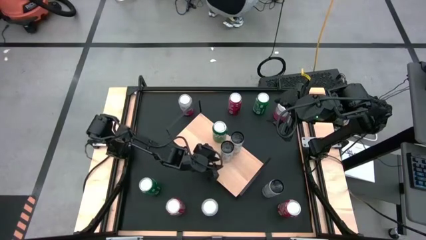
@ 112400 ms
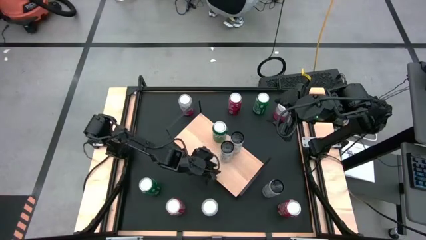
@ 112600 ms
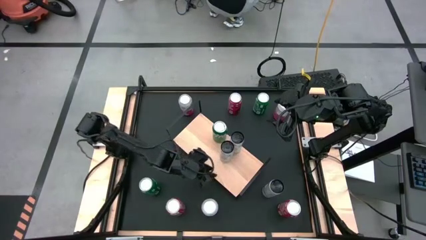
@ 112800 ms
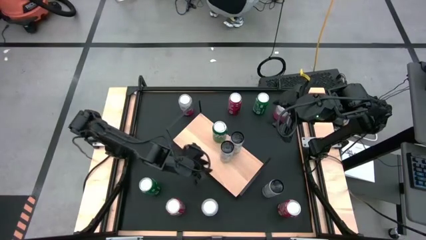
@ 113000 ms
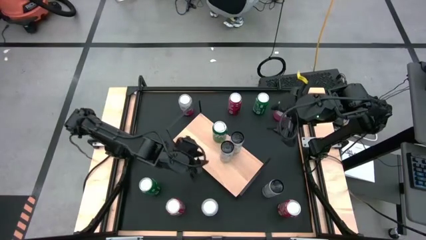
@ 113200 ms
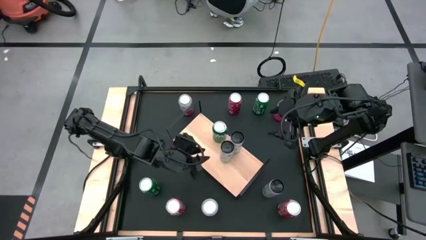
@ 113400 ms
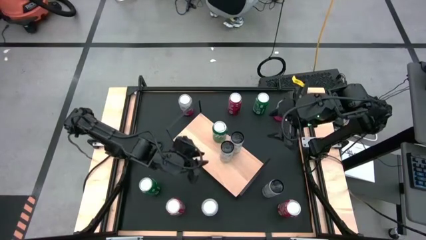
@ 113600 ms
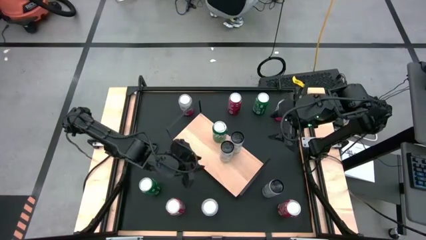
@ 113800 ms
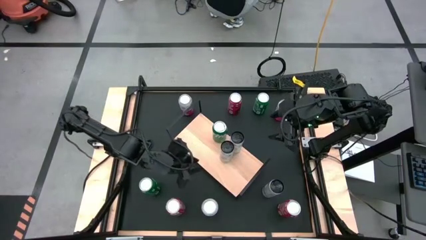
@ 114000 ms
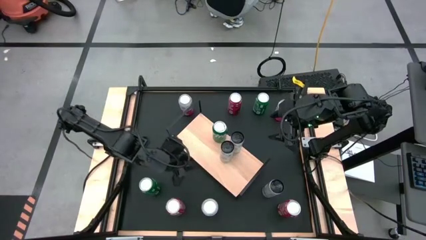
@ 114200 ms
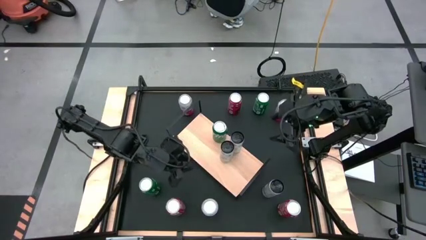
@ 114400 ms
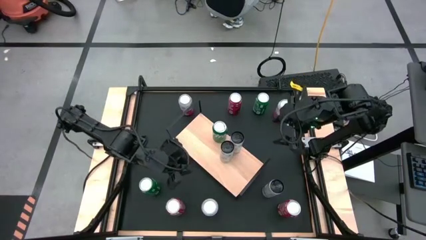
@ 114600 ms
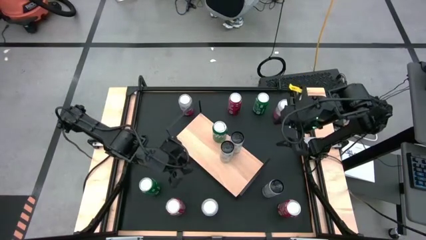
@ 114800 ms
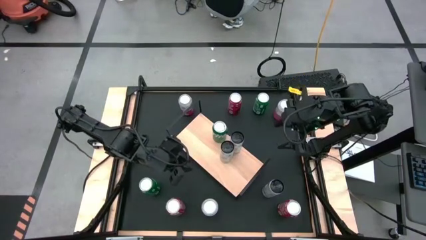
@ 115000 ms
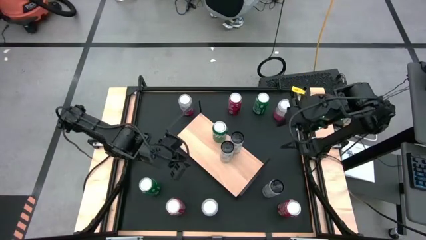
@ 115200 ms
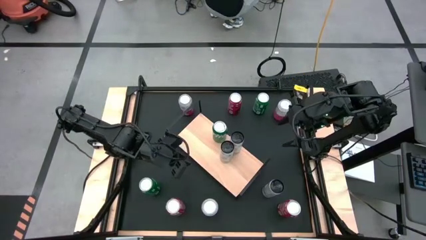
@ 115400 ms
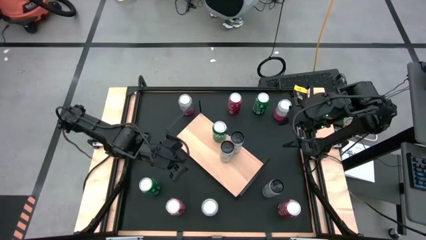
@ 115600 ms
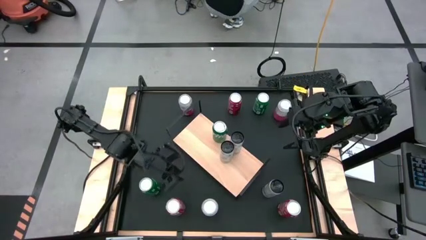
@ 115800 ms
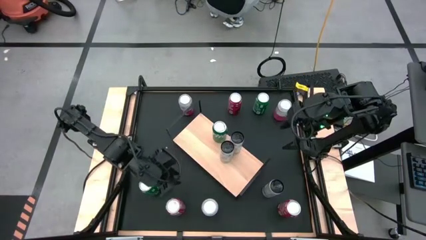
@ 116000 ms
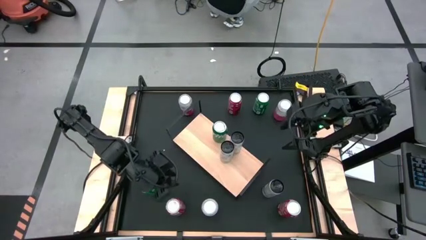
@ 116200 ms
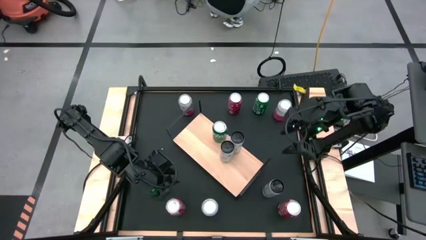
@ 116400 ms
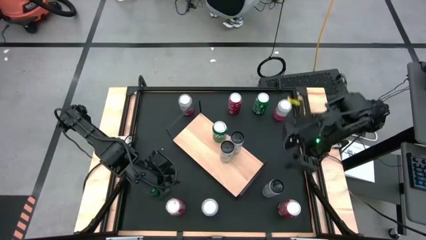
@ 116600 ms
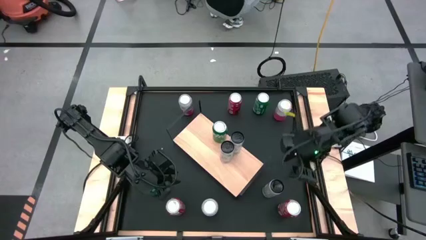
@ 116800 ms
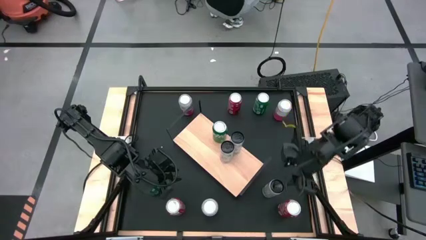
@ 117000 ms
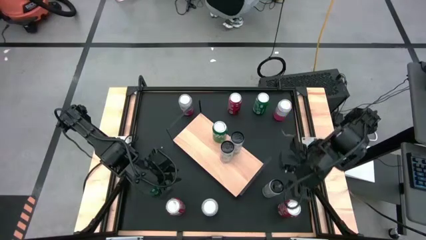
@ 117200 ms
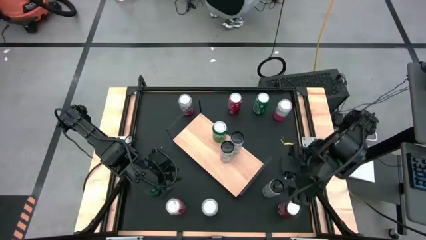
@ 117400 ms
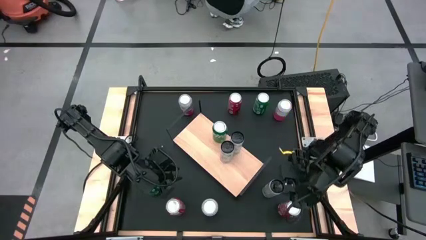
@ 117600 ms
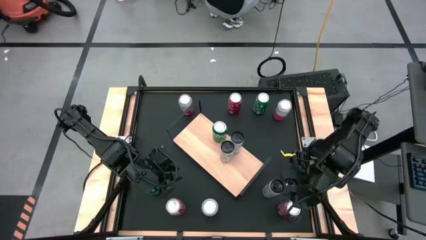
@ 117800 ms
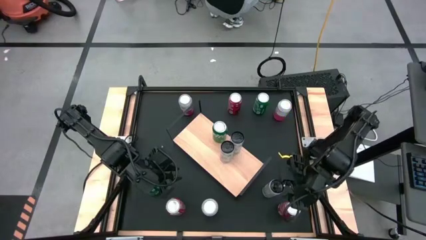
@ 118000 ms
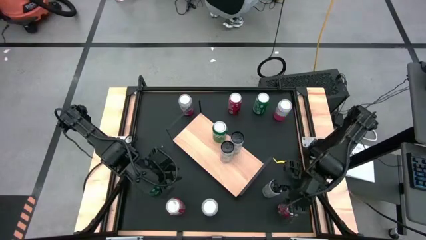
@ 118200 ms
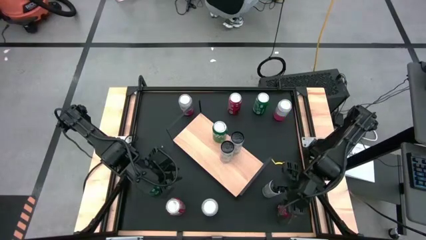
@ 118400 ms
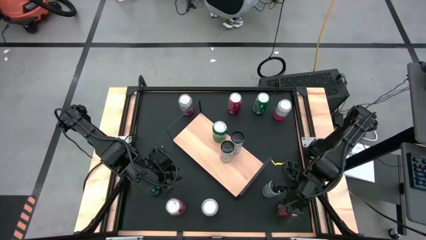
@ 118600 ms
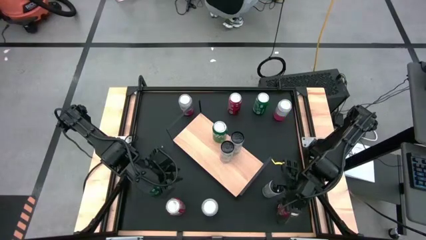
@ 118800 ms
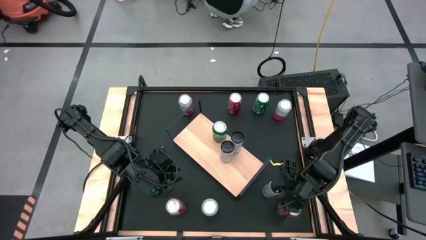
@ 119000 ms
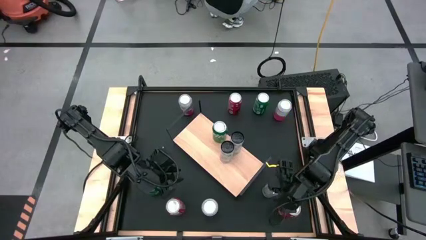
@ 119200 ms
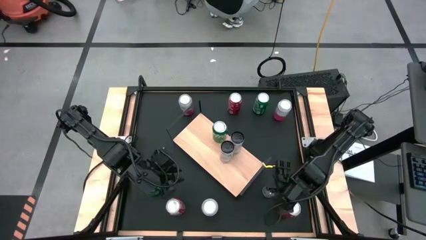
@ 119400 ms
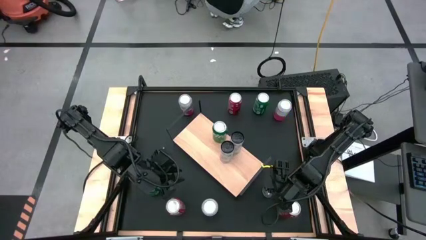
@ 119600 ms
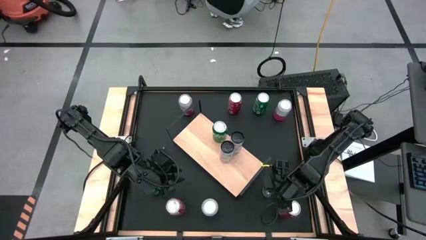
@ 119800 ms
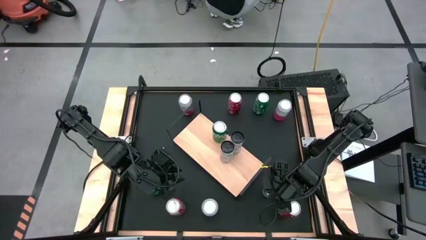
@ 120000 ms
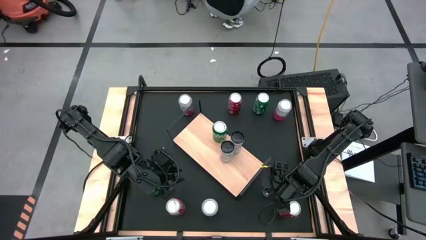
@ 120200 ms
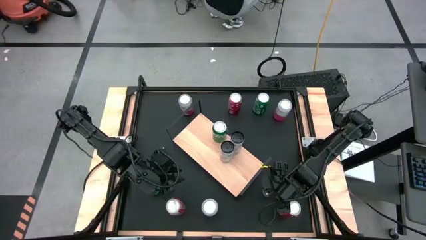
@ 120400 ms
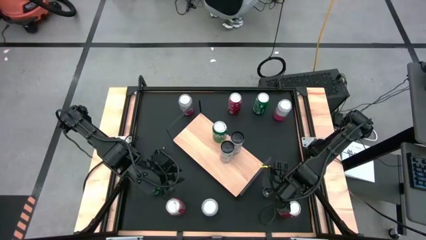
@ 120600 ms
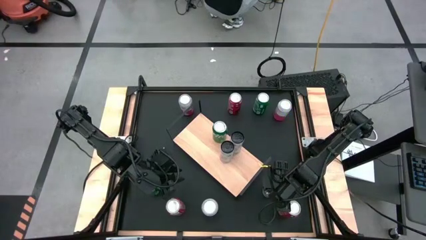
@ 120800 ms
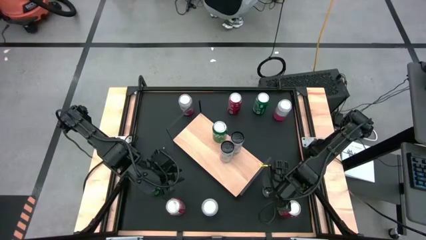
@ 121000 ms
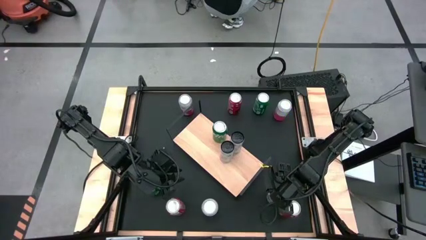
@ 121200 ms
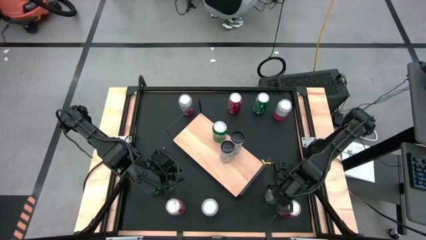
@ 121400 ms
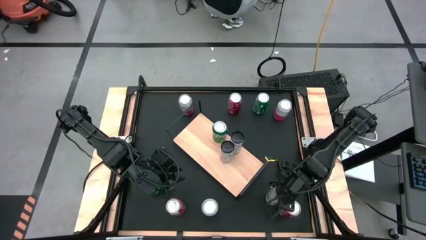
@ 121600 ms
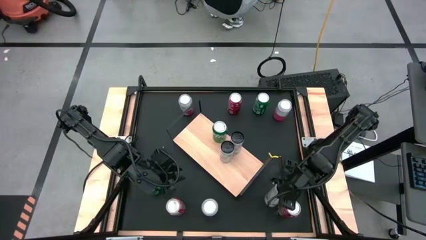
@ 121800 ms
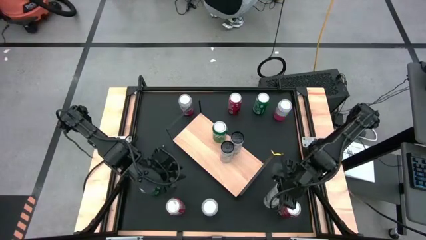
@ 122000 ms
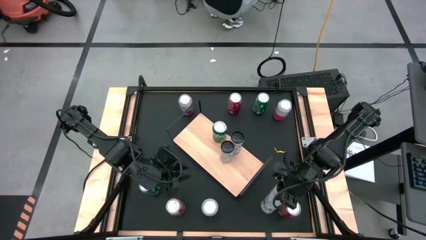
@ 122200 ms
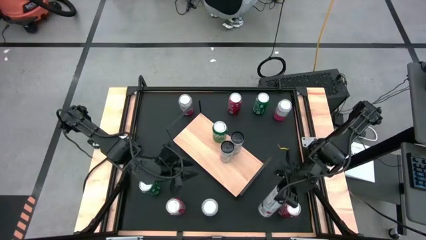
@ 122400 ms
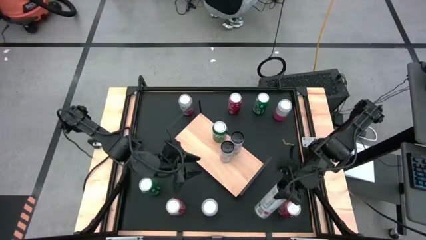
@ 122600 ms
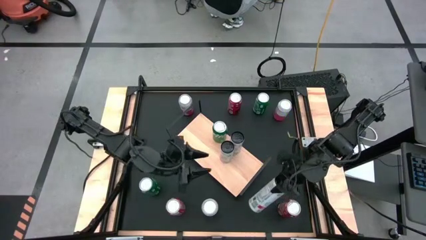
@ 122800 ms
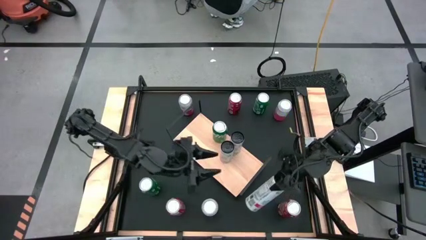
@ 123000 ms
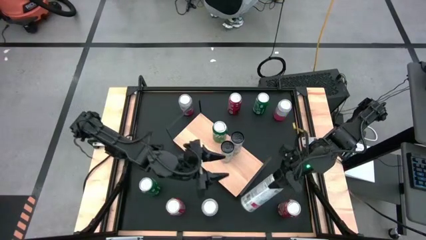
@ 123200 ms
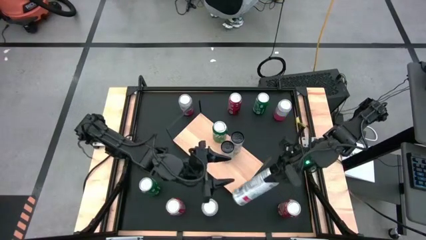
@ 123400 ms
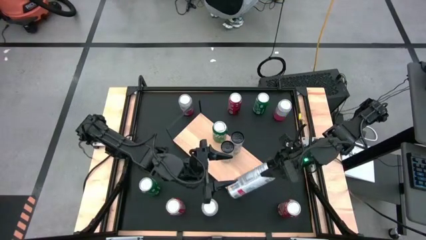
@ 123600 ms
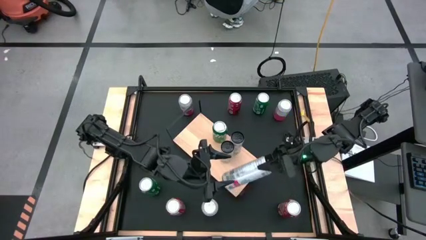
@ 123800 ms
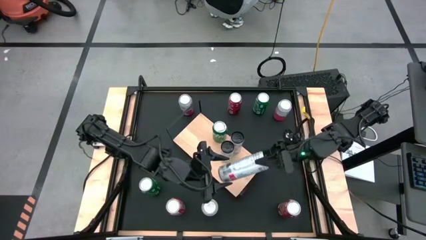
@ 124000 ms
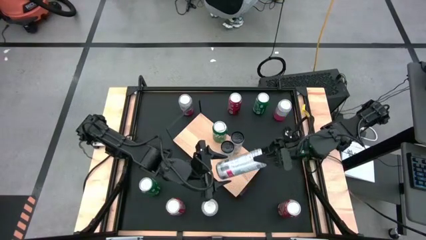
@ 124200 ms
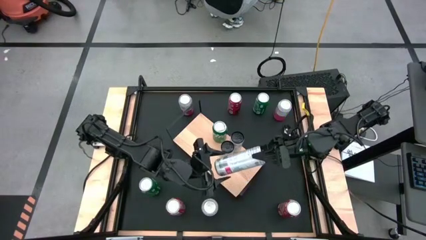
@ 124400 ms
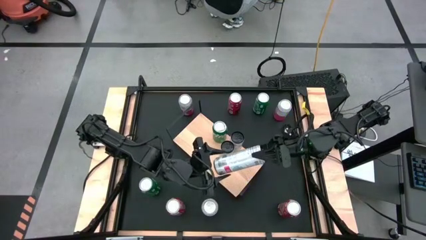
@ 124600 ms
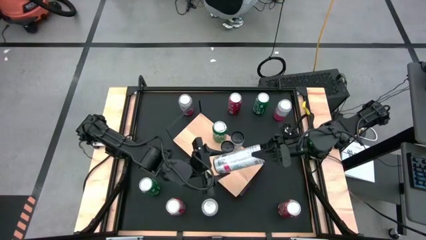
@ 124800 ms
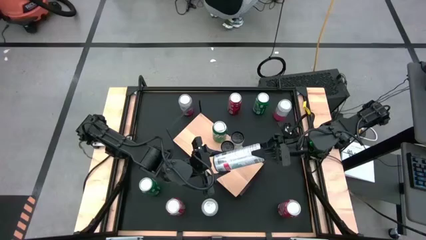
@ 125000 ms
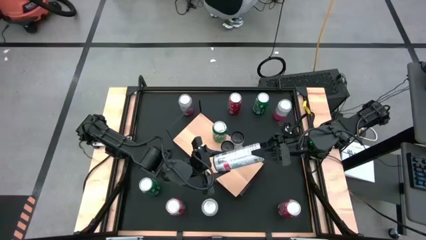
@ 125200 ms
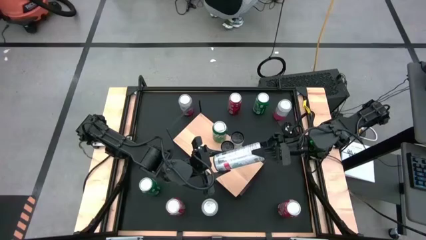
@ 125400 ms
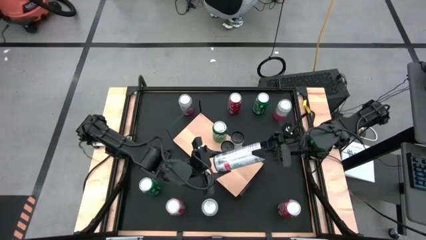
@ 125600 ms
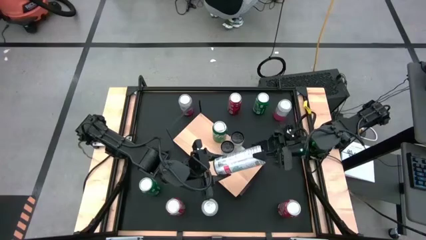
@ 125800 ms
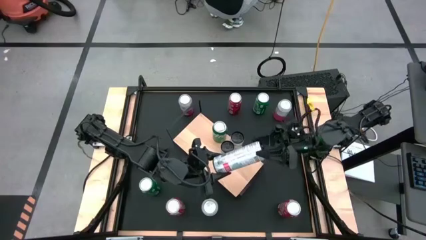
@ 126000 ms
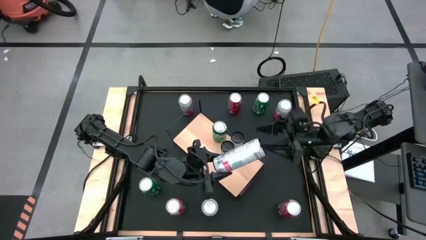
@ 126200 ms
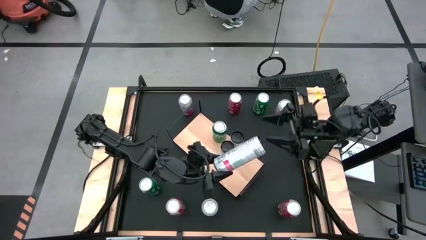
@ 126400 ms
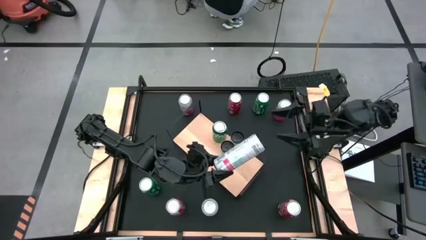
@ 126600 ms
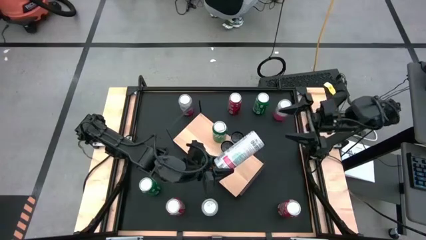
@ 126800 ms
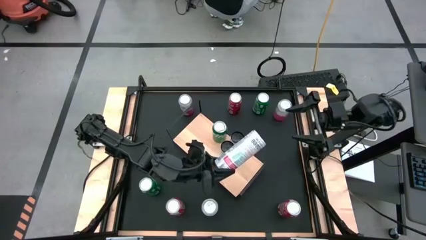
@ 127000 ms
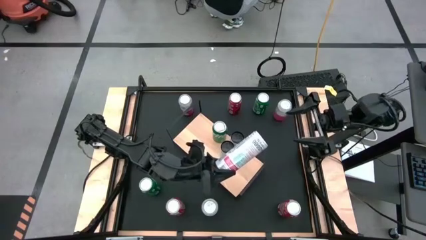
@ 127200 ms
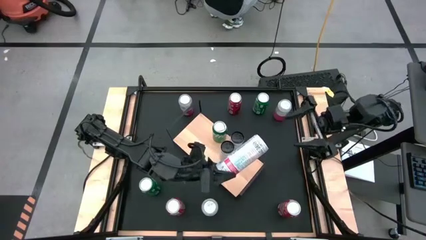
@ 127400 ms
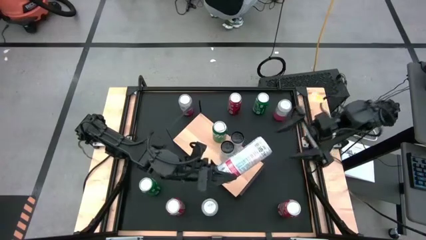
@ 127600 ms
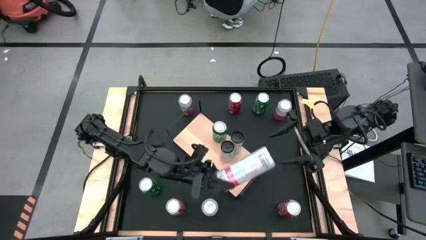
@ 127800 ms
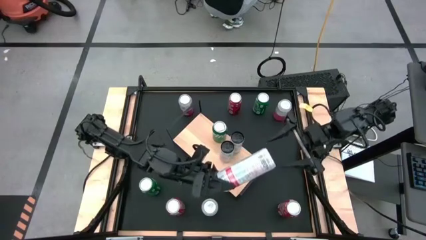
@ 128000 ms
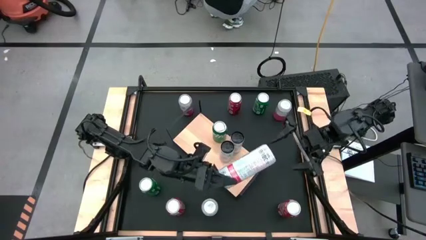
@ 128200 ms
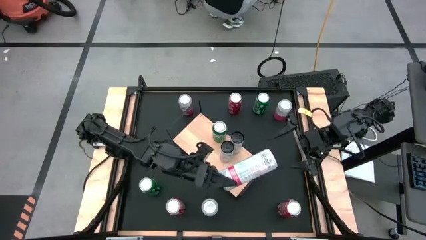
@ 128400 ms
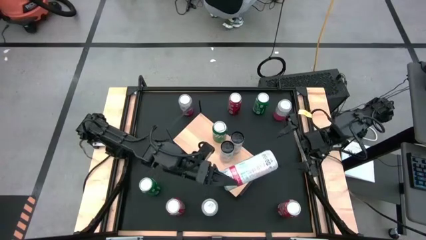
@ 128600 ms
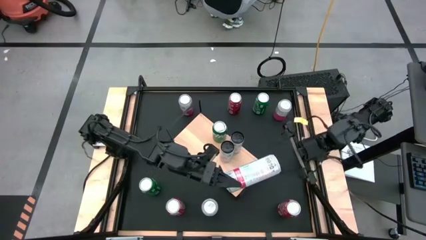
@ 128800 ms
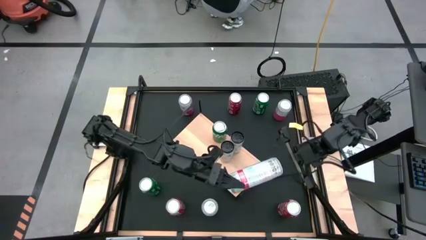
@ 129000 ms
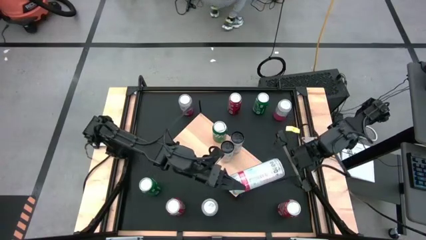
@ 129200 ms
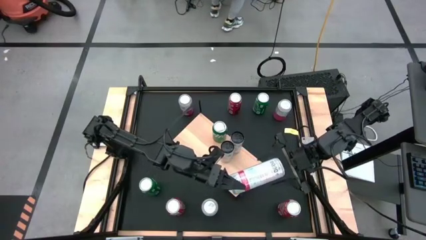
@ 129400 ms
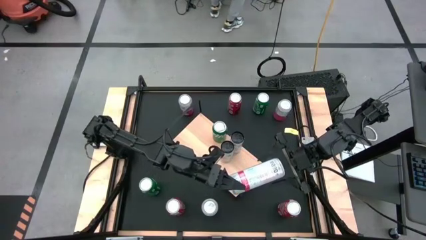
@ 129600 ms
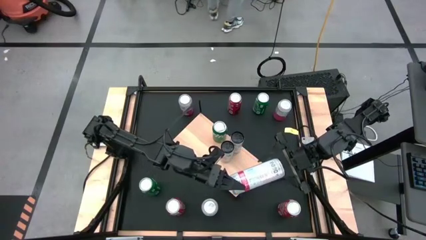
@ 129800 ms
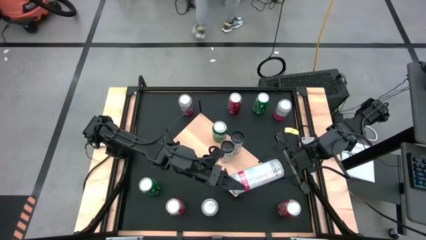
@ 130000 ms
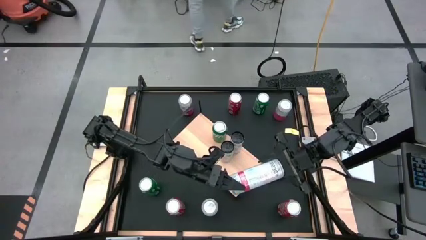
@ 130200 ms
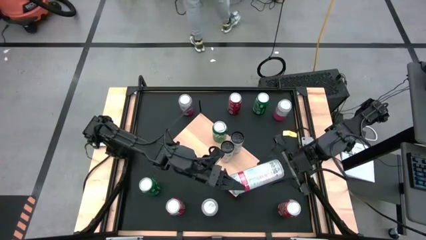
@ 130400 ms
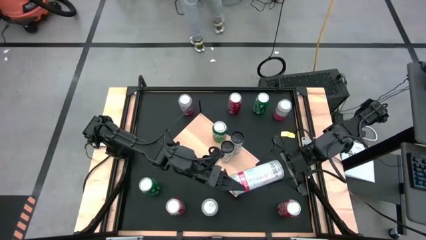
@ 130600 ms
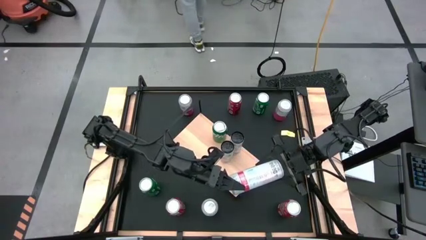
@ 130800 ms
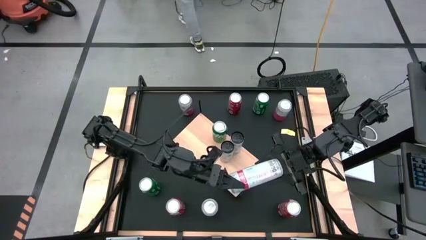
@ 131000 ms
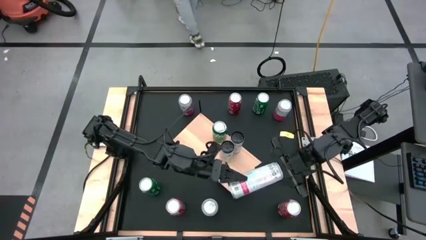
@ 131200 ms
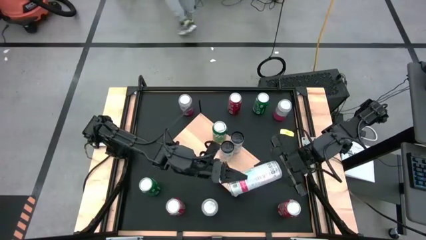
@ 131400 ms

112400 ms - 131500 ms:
Task: Place canned beverage on shelf
Put the white soda can aligned with the other white soda can
